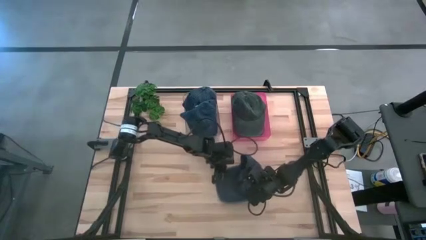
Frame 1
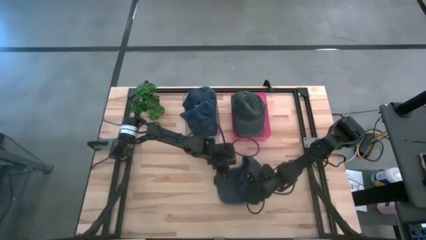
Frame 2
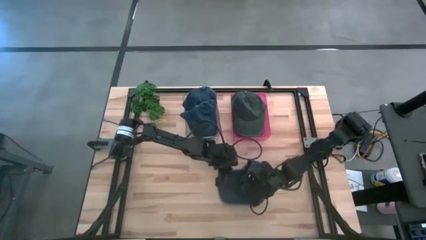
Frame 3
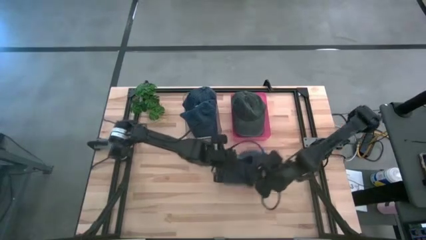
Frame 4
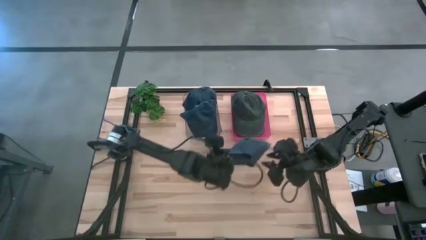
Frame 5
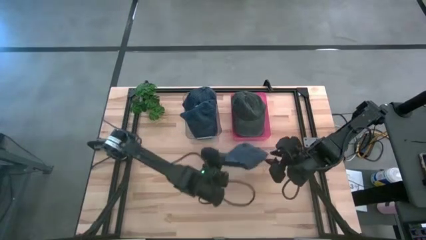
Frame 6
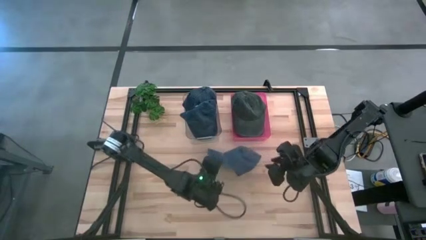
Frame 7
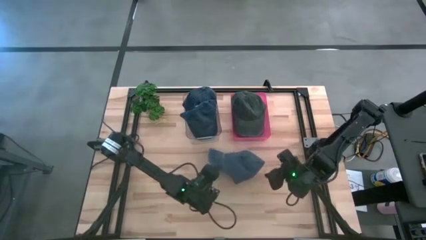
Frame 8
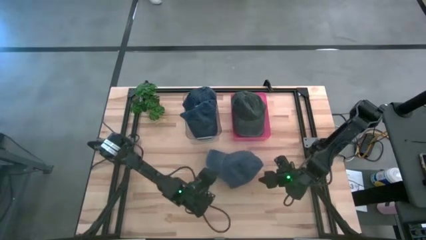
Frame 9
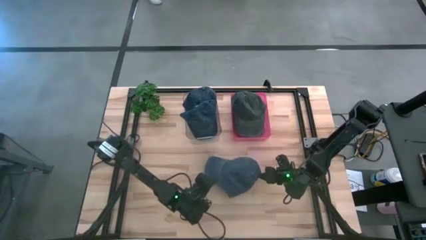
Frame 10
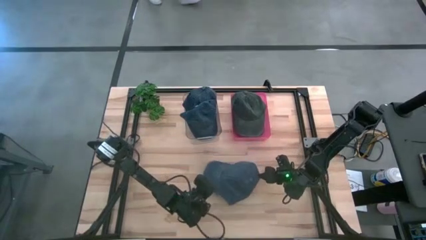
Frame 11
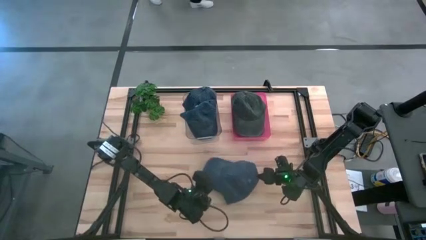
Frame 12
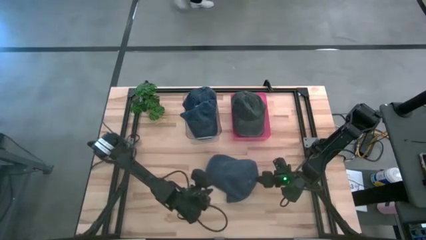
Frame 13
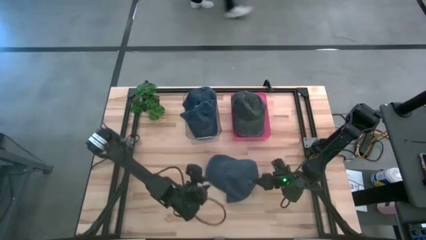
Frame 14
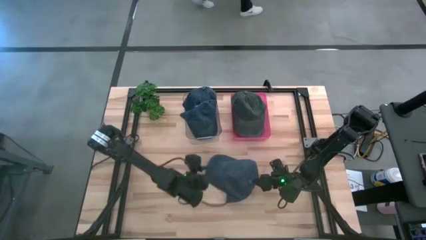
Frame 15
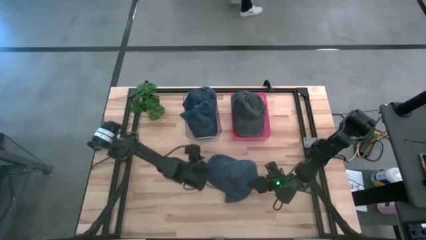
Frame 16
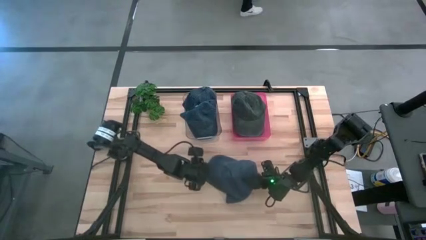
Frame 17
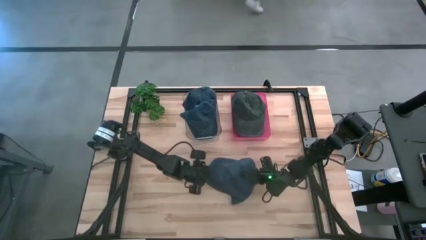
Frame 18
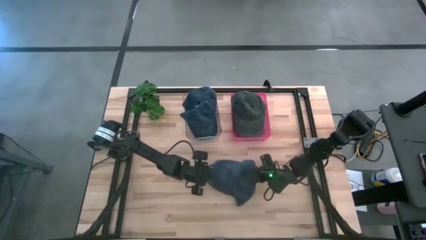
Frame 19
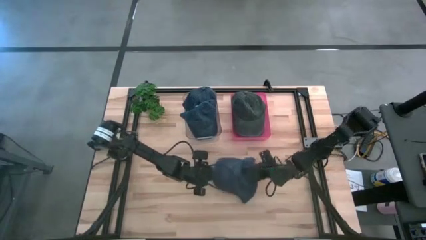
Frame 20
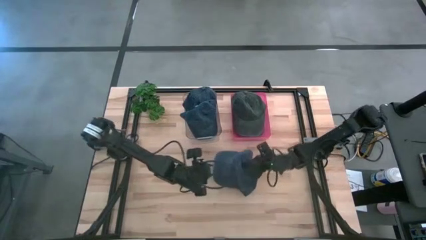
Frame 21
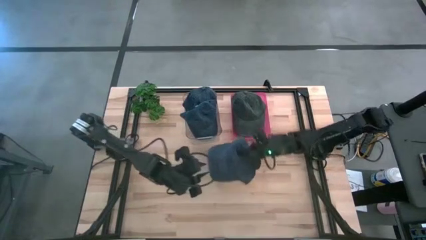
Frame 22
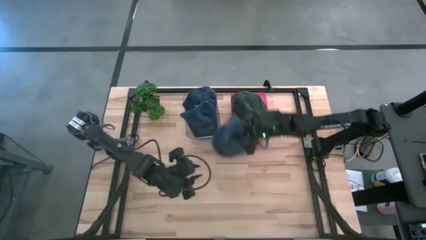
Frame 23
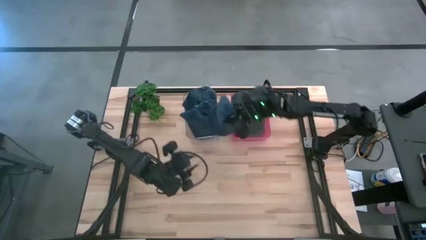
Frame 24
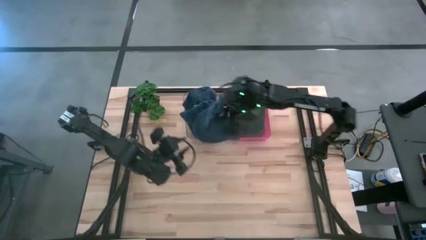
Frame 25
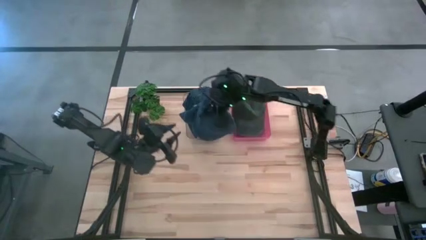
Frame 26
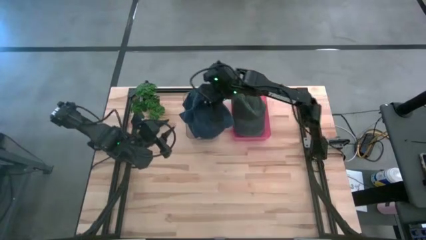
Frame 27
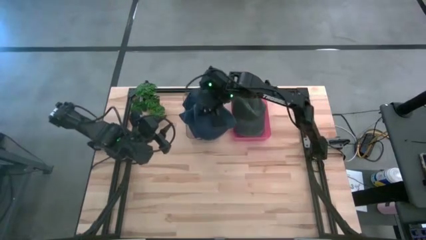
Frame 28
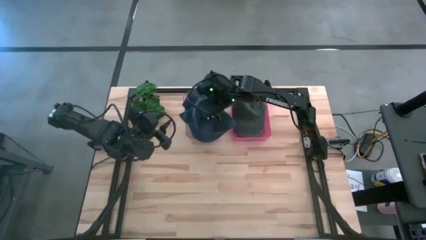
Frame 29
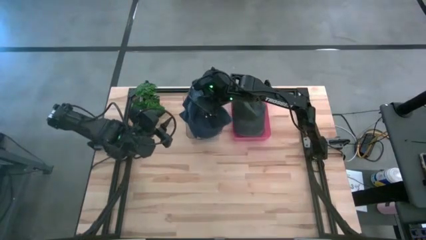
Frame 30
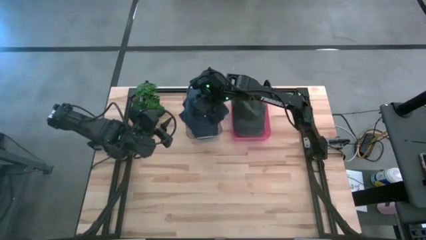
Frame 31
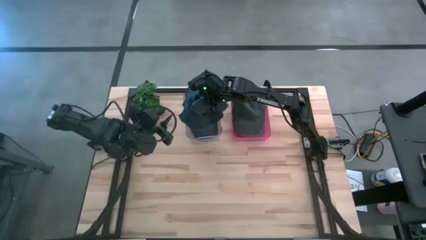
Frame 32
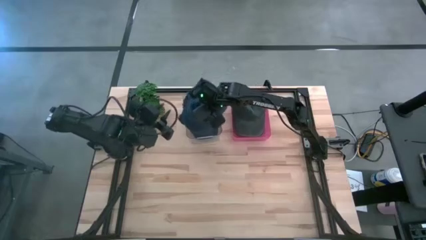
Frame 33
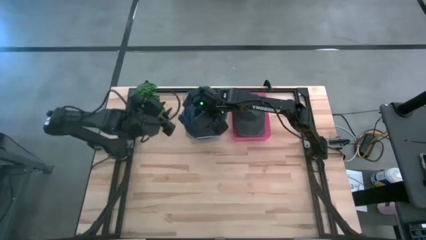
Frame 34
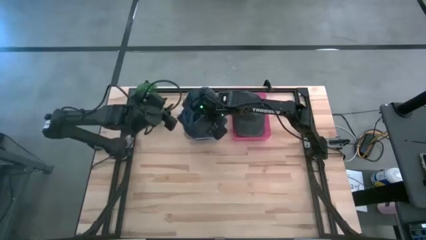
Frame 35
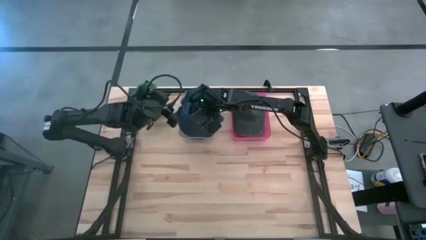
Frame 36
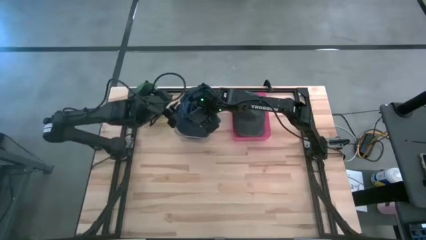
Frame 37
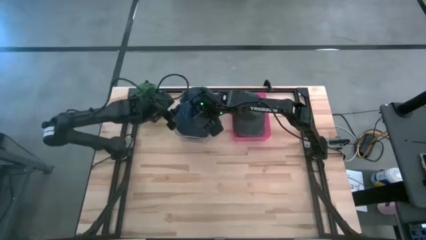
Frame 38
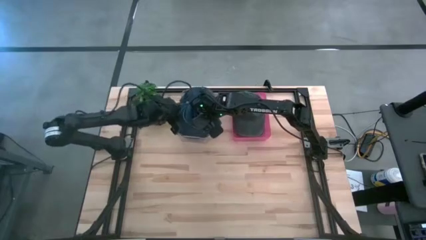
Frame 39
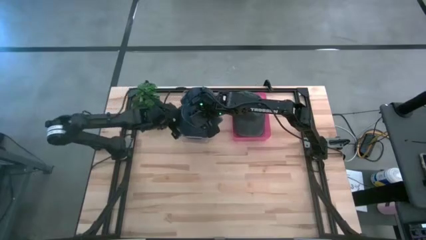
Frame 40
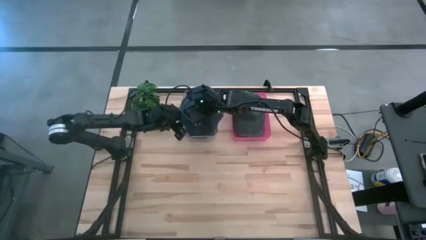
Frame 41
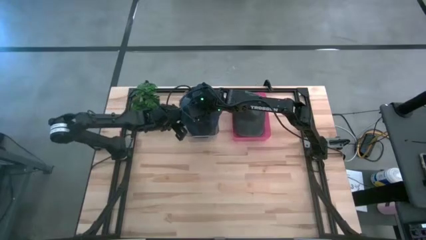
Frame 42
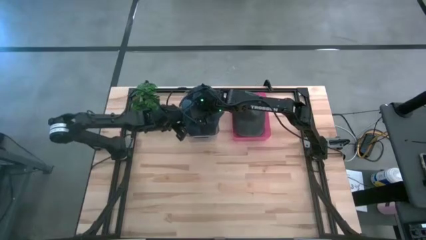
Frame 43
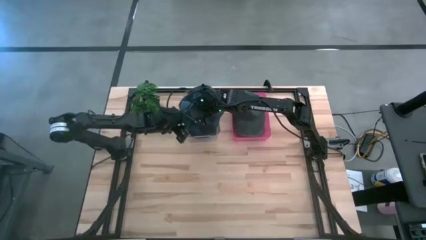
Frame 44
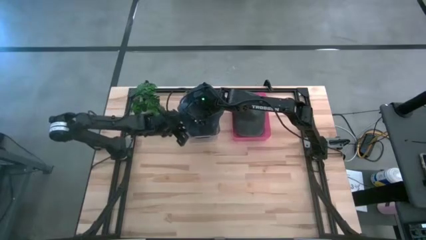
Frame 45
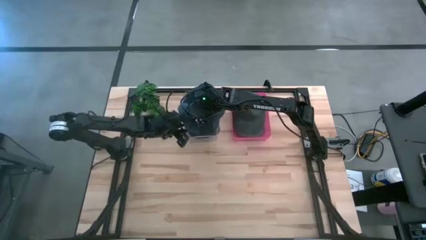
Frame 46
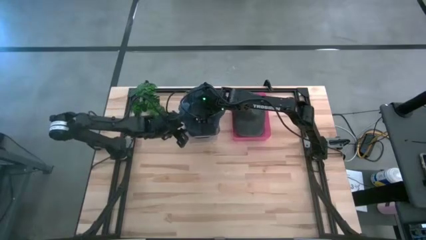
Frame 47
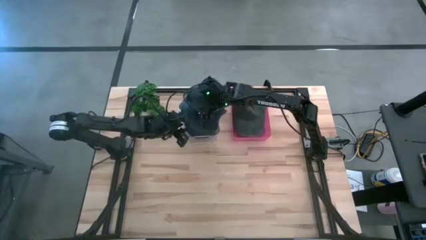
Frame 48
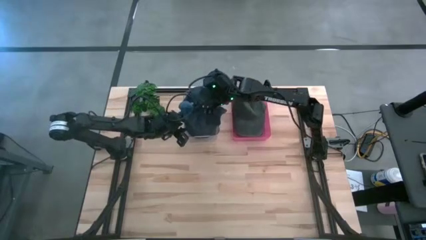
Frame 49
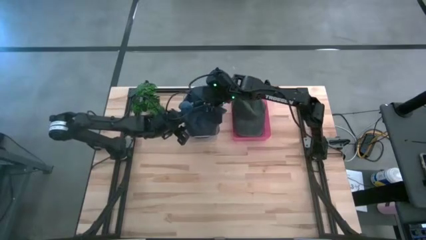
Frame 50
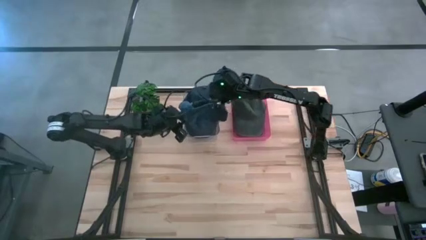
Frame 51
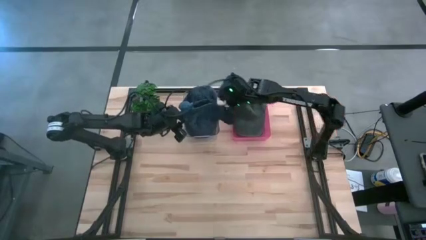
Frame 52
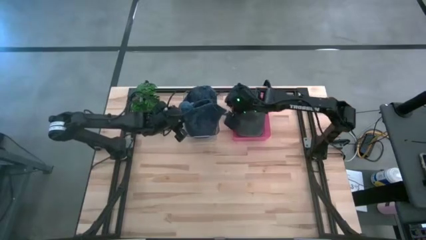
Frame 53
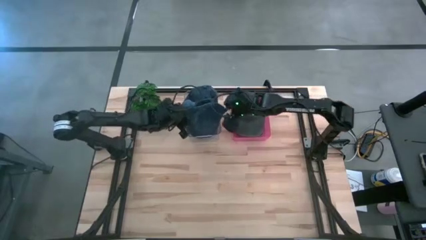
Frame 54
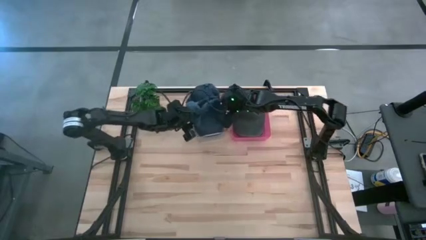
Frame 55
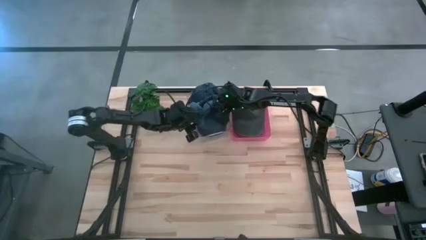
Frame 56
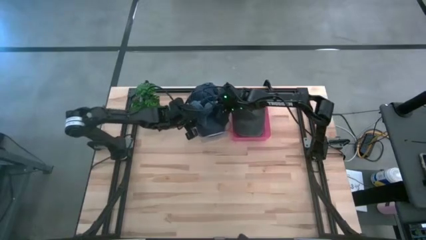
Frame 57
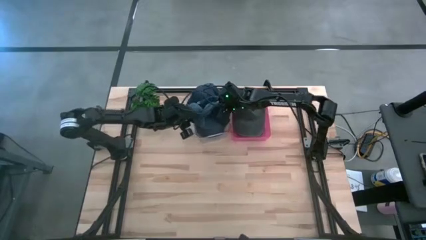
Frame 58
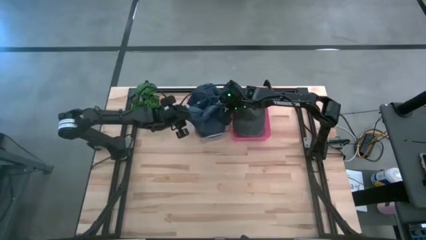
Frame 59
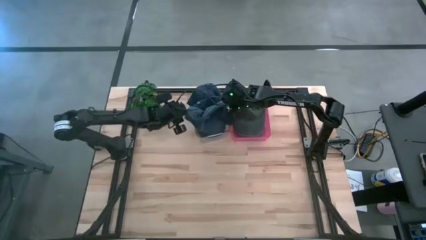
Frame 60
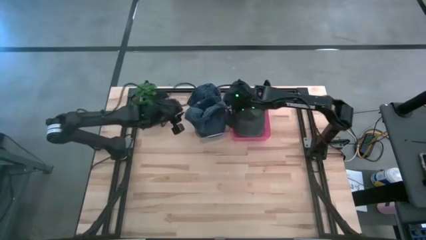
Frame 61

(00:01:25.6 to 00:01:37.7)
Task: Pick & Place hat
Put the blue cap into the transparent bin

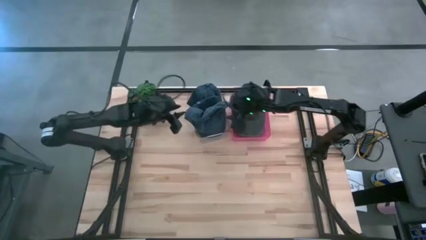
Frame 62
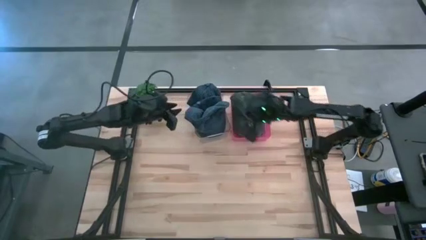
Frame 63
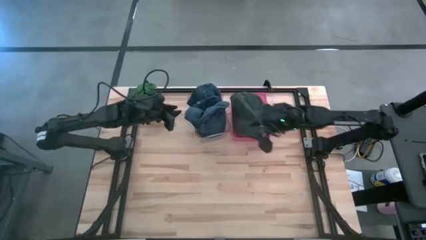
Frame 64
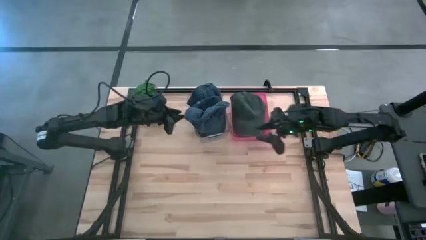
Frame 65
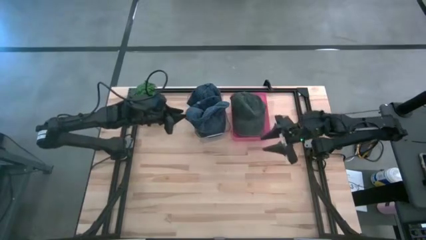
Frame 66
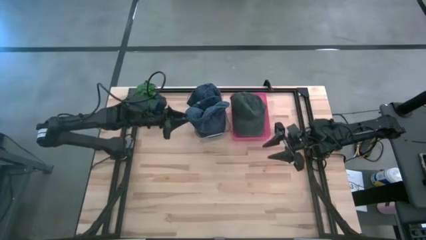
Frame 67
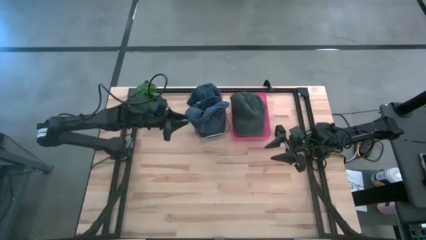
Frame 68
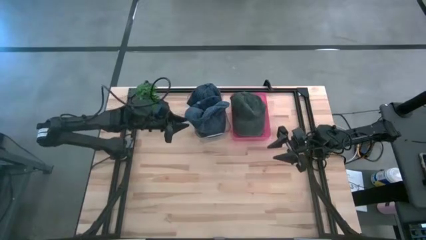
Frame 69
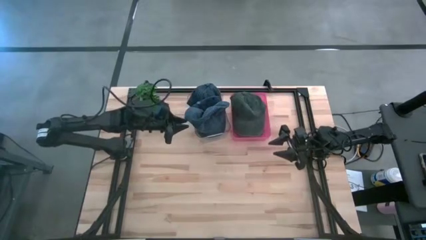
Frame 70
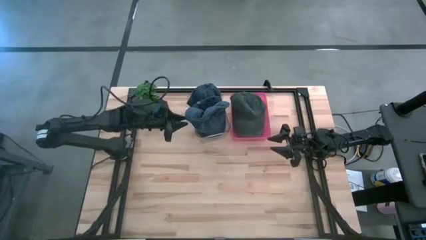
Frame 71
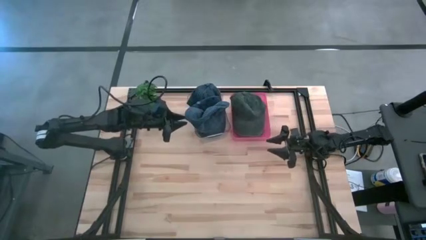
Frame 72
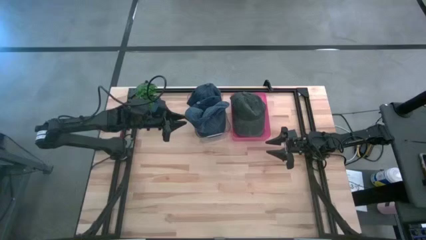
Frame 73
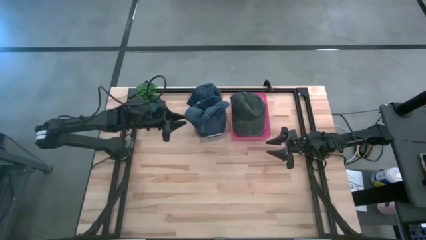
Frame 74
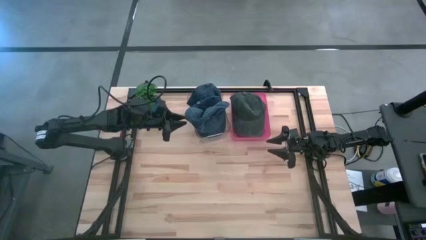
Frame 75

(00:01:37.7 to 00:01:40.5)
Return to Home Position

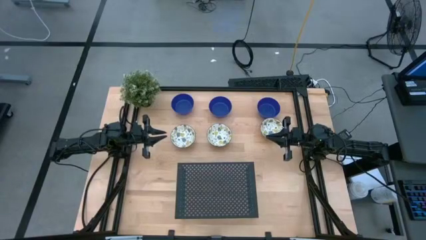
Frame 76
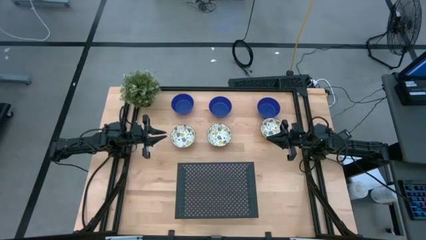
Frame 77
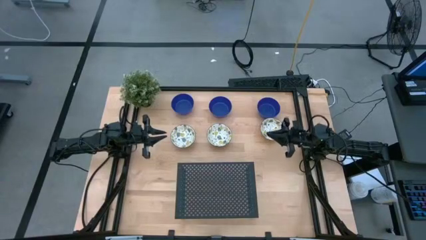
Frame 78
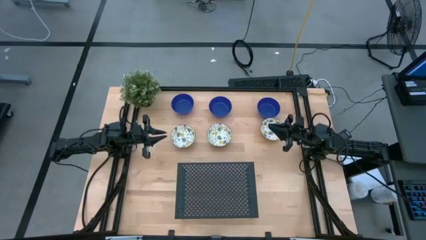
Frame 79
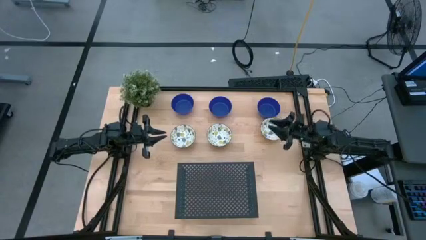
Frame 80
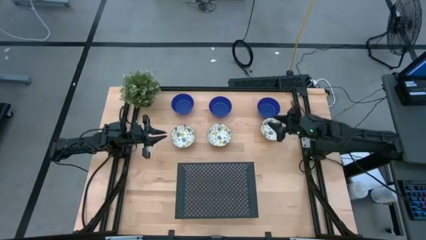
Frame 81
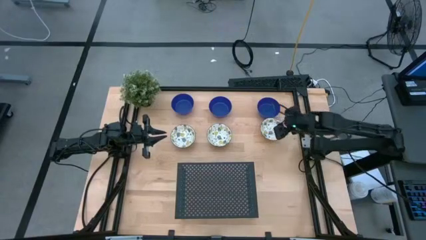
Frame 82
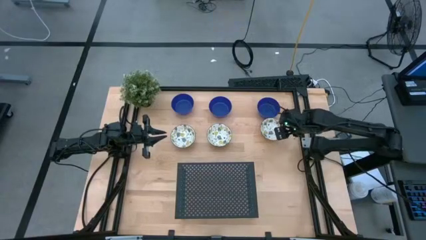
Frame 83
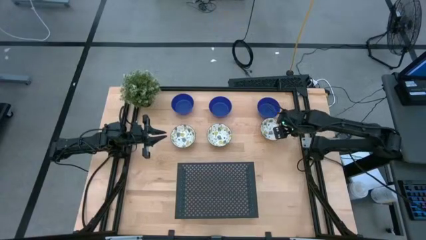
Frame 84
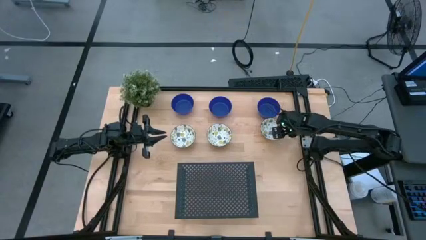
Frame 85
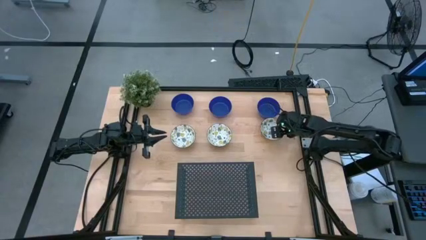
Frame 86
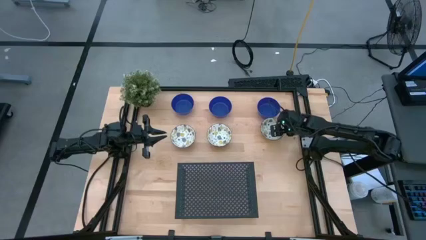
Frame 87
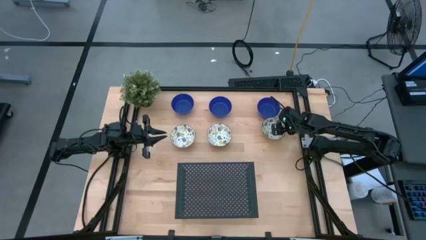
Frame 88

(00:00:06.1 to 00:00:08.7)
Task: Pick & Place Mini bowls
Put the right patterned yellow bowl on the shelf
